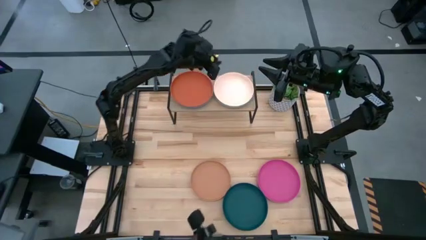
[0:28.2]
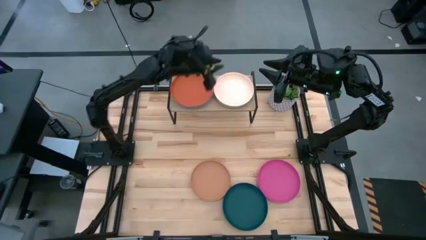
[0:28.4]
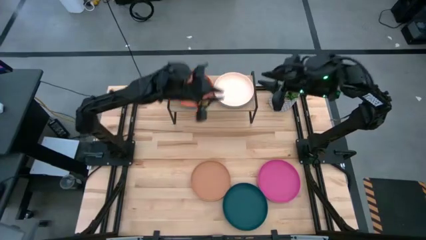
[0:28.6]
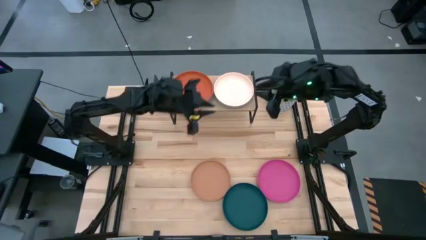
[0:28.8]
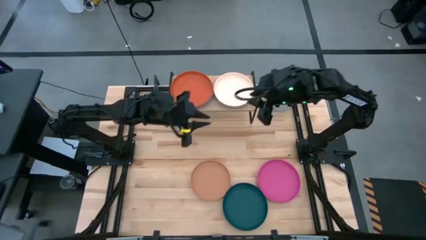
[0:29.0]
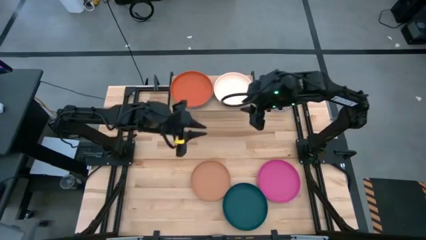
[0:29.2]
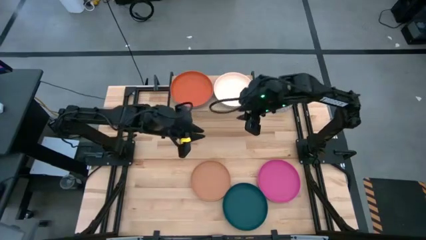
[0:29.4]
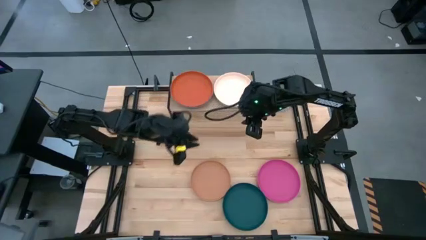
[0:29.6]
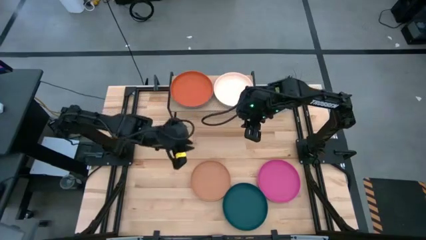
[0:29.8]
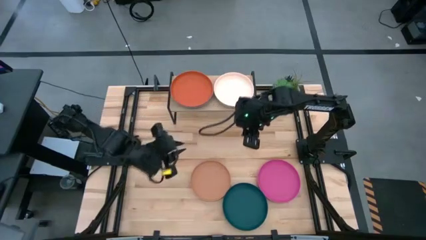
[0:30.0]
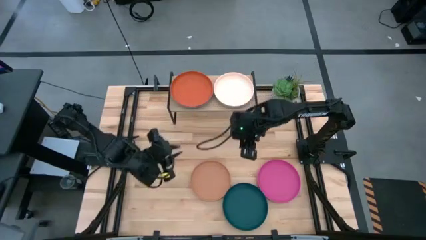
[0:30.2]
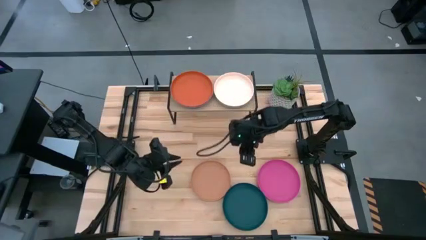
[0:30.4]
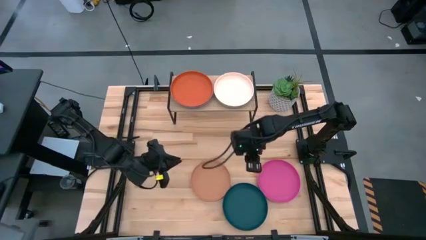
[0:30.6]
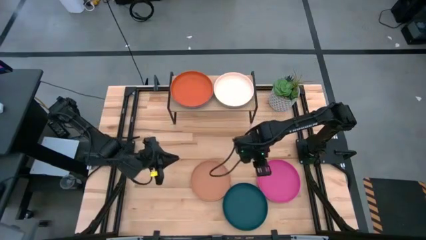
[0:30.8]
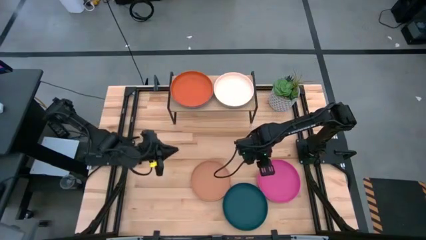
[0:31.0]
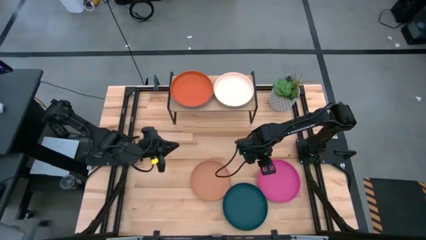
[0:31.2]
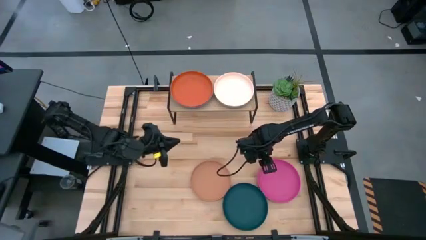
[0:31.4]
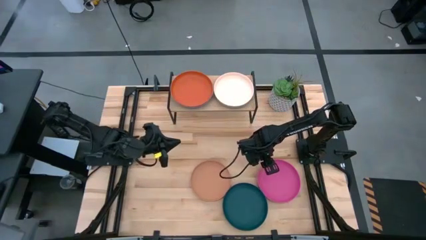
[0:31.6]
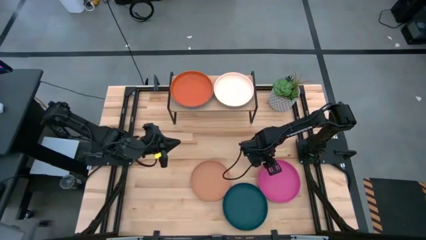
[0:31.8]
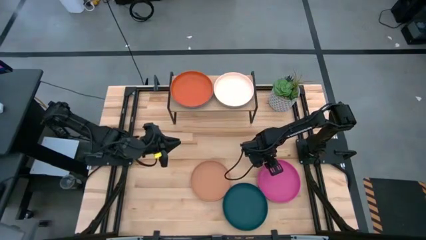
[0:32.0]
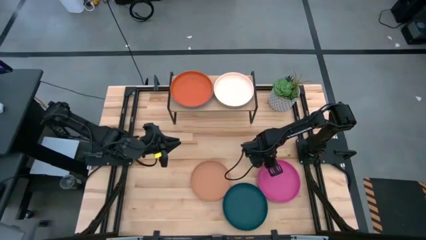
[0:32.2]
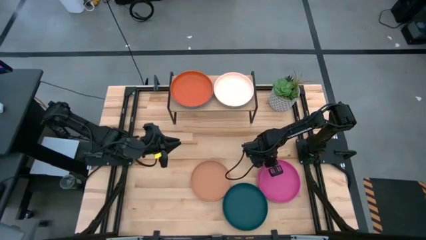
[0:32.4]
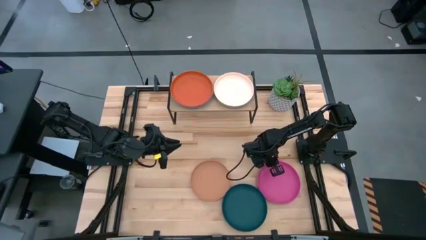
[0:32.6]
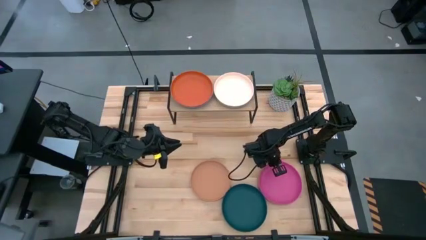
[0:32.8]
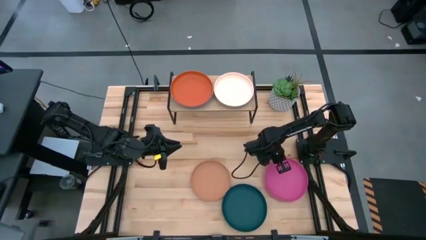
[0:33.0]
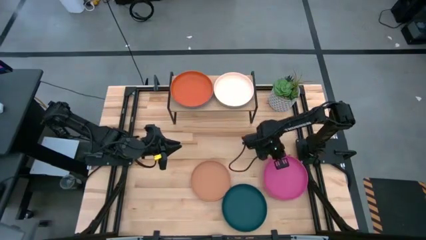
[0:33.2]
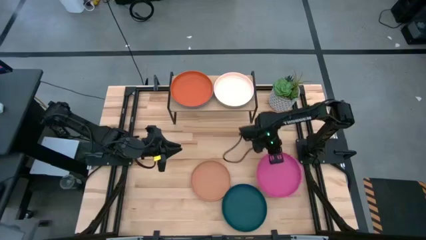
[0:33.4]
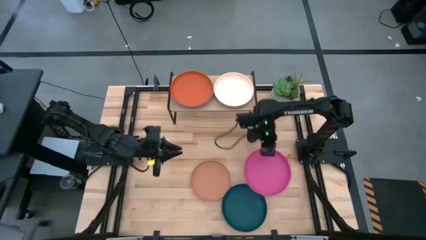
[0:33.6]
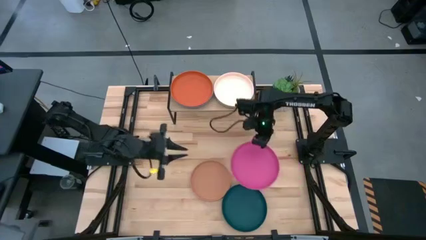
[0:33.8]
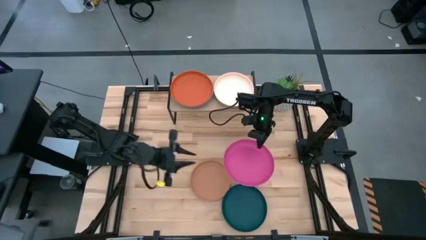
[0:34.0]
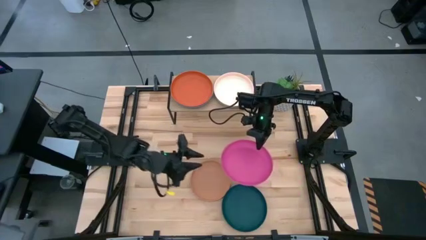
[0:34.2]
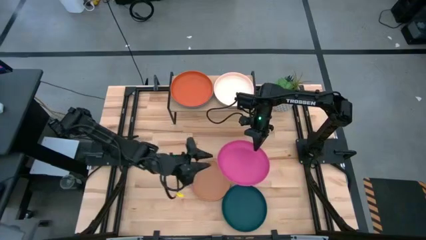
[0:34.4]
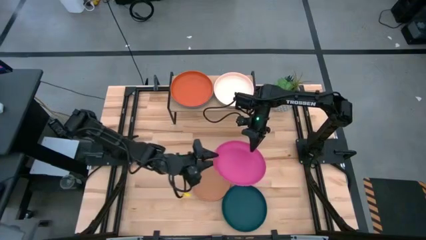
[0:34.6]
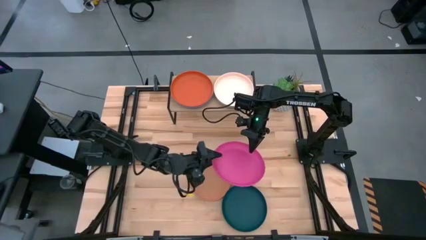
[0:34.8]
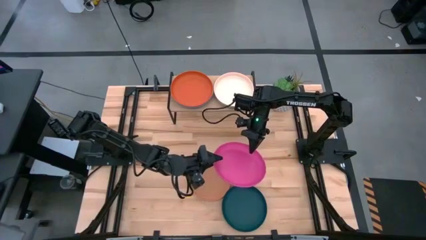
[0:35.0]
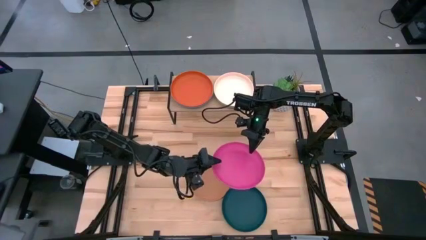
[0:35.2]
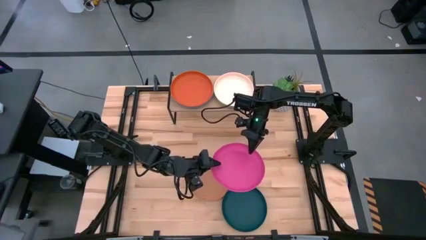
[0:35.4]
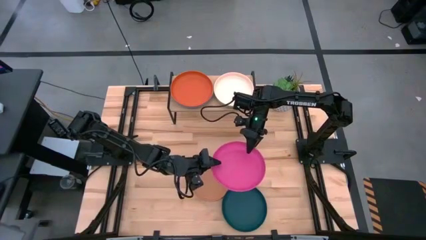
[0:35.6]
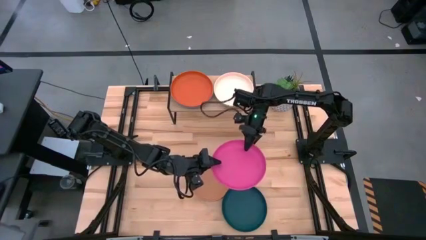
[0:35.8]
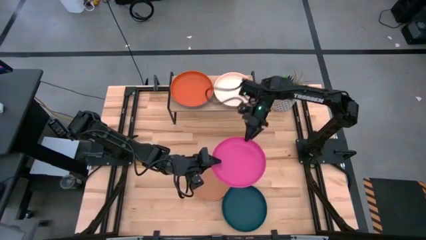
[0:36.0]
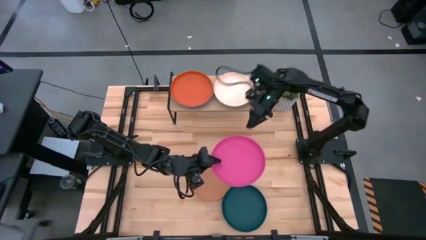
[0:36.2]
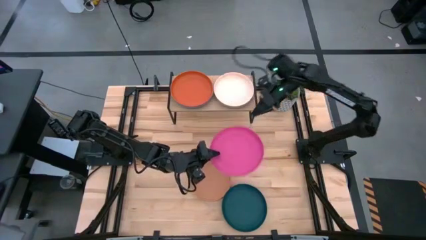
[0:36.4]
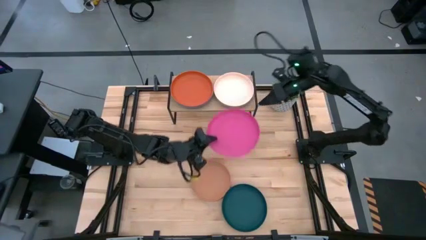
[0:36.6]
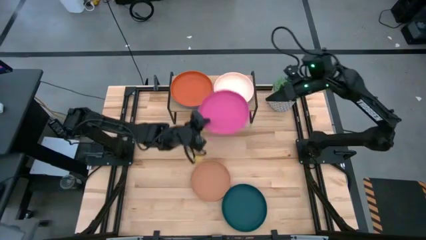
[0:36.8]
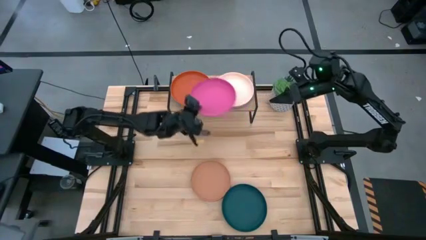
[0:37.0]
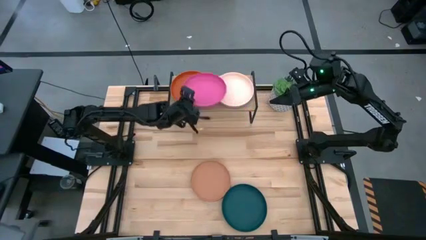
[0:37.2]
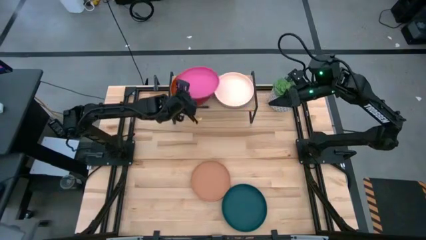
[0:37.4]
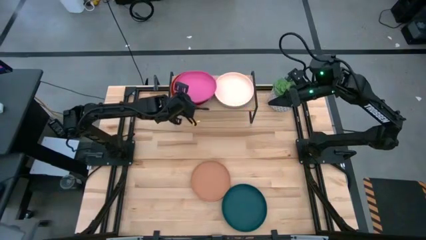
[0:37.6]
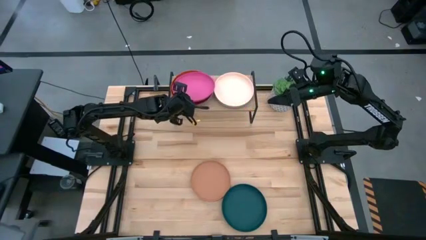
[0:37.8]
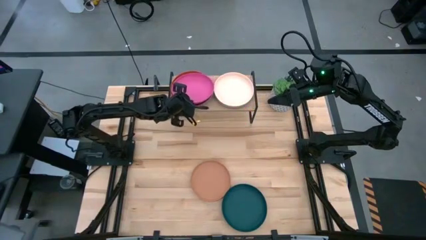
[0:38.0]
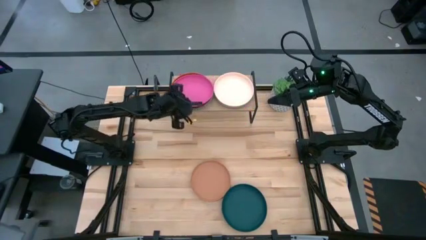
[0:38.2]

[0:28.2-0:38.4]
Task: Place and stack plates onto a shelf
Stack the pink plate on top of the orange plate on the shelf

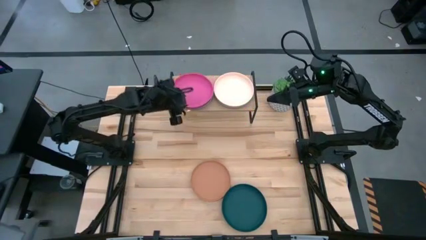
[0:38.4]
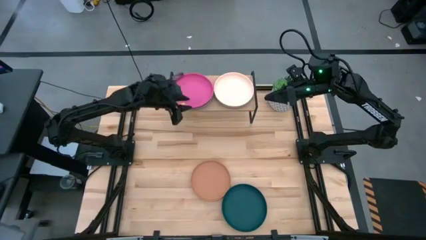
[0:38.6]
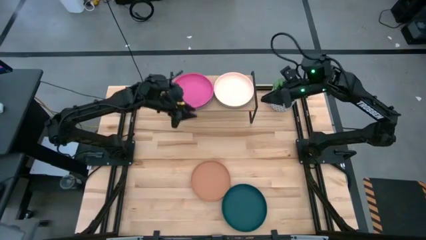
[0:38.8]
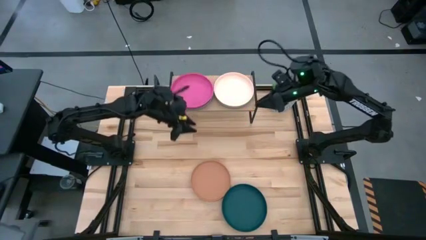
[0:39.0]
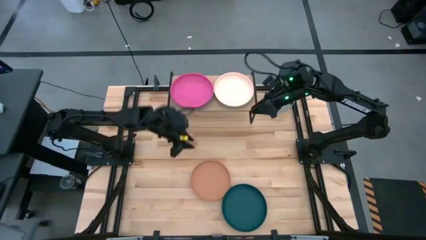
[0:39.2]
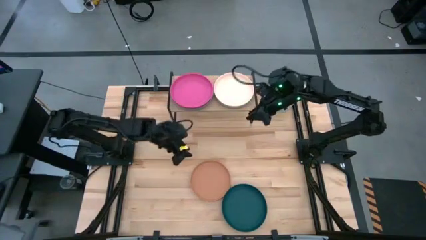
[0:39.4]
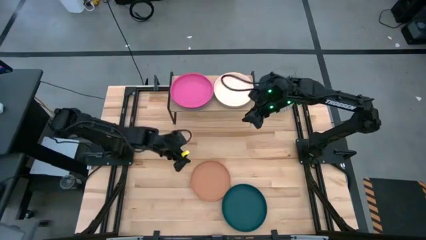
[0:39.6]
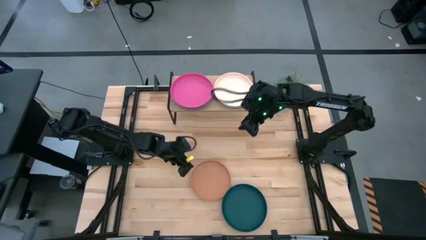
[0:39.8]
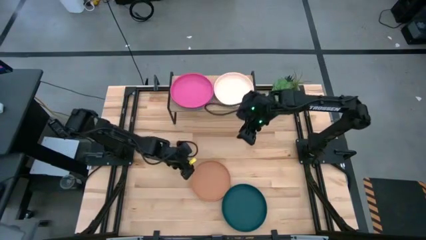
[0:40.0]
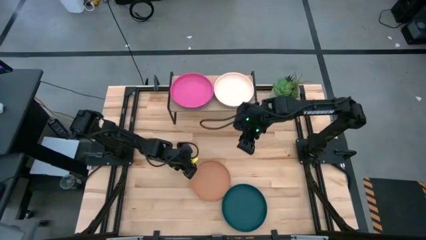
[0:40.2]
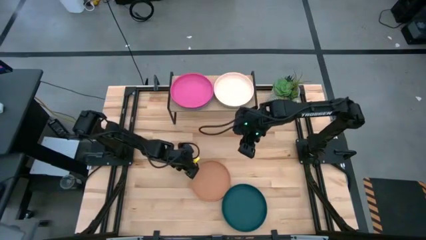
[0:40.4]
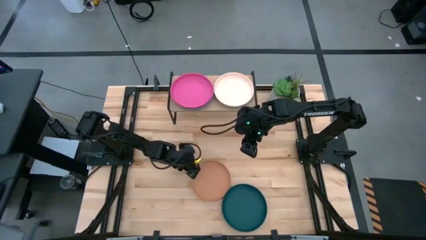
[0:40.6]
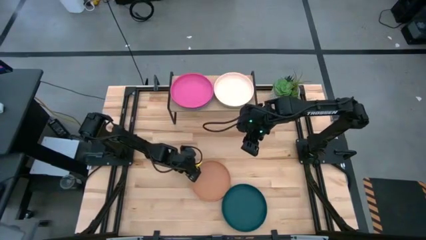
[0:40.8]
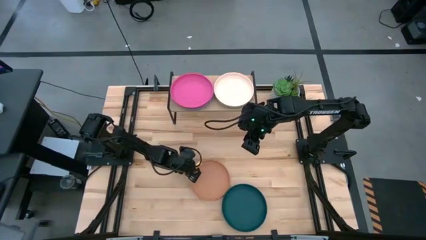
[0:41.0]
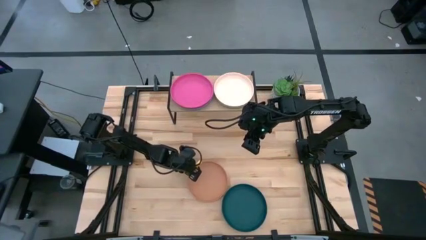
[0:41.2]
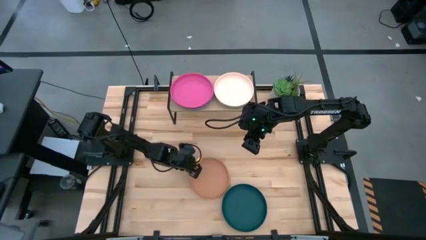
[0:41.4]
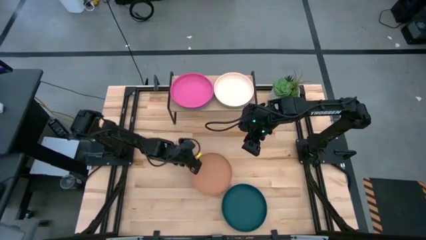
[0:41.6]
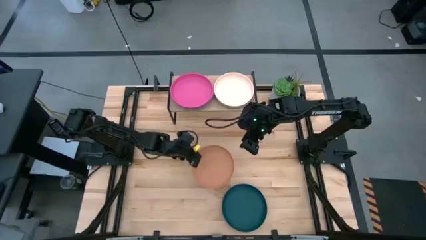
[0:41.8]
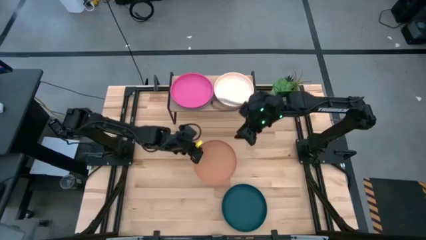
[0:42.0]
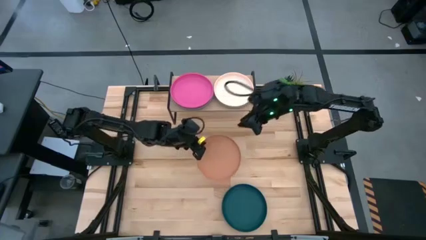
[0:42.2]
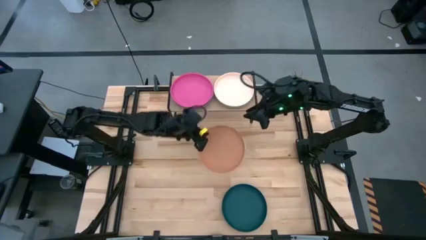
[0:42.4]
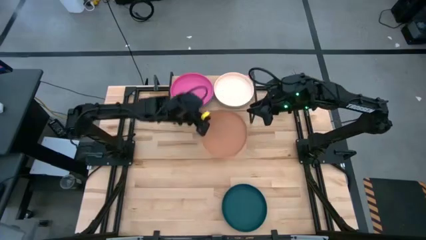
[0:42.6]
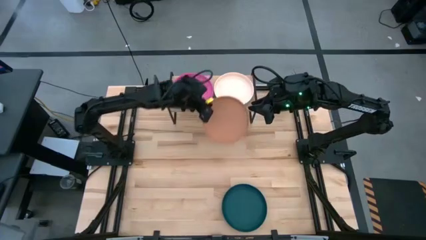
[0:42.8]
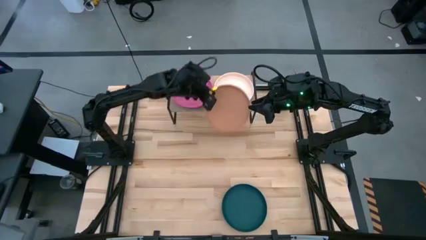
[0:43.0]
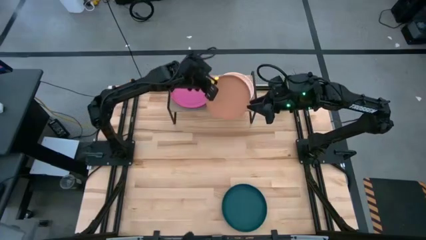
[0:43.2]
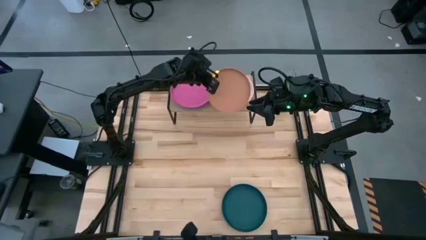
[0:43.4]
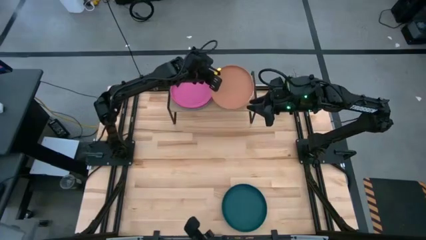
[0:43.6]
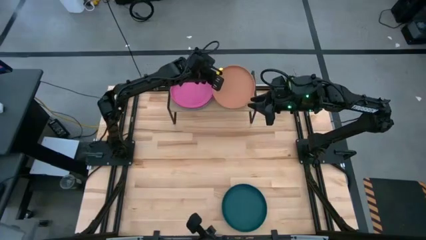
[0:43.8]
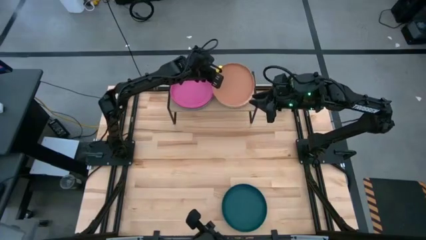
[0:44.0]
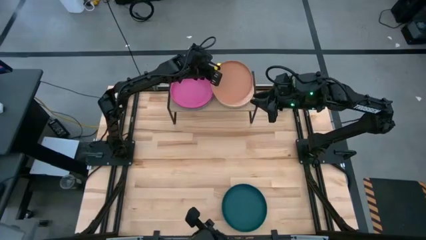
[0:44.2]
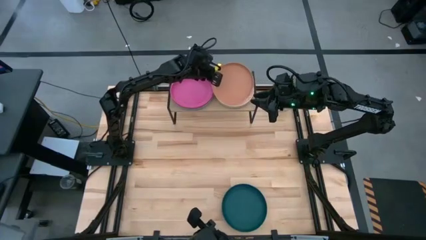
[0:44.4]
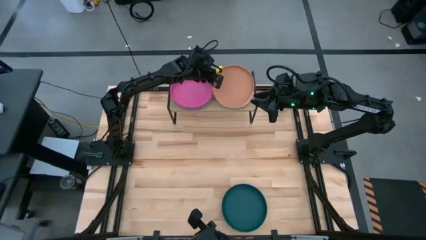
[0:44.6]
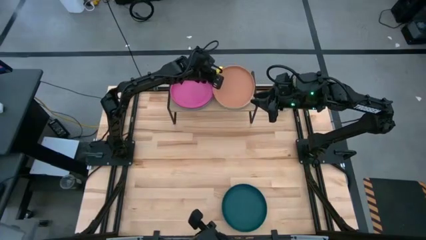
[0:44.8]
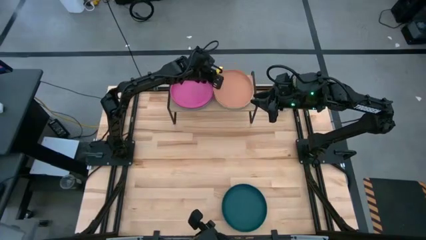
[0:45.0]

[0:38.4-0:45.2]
Stack the brown plate on top of the white plate on the shelf
